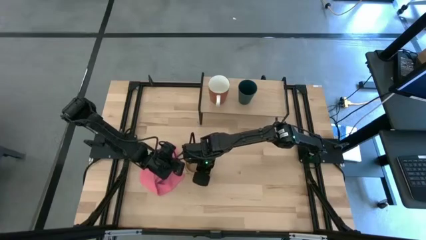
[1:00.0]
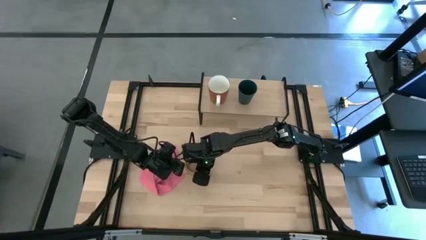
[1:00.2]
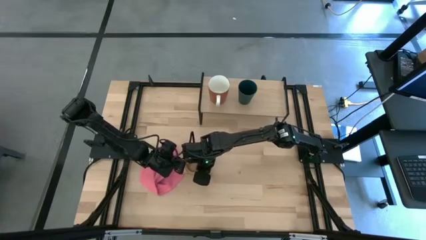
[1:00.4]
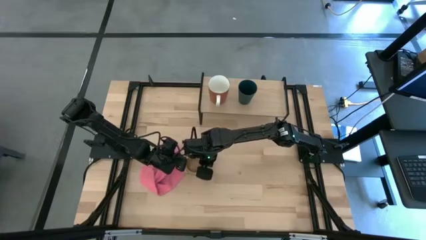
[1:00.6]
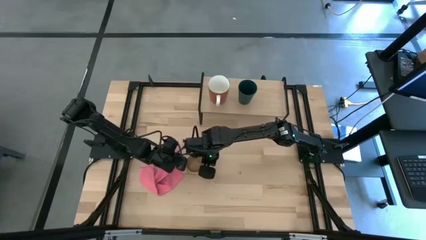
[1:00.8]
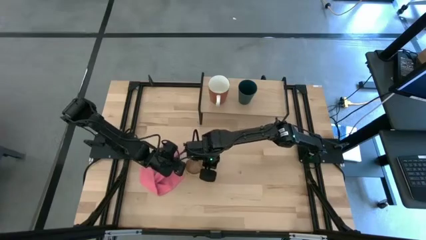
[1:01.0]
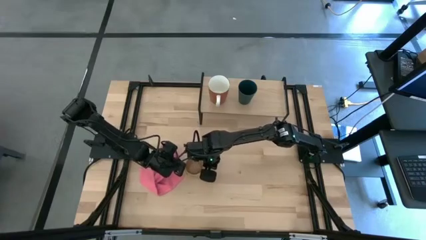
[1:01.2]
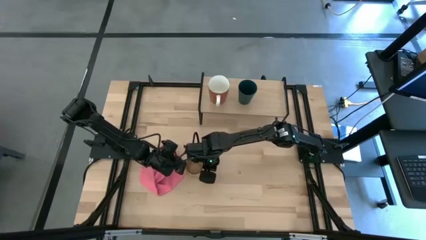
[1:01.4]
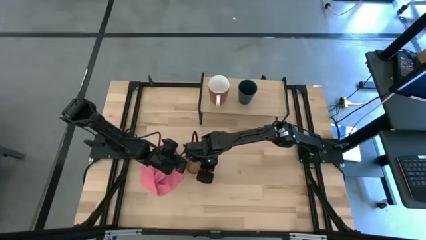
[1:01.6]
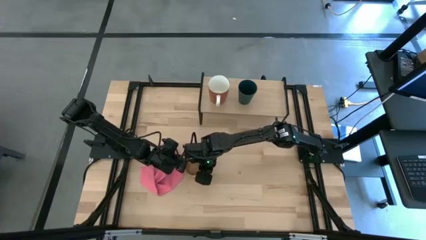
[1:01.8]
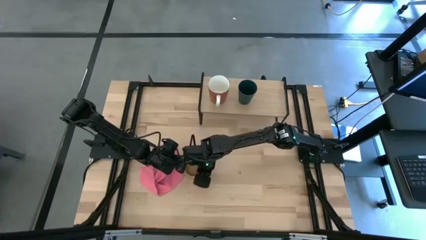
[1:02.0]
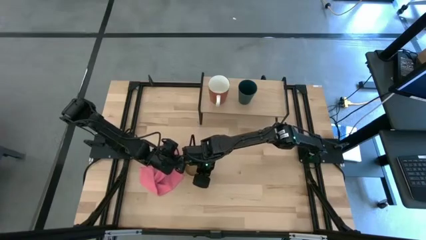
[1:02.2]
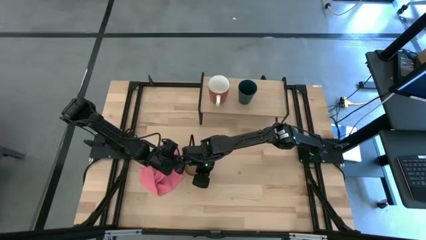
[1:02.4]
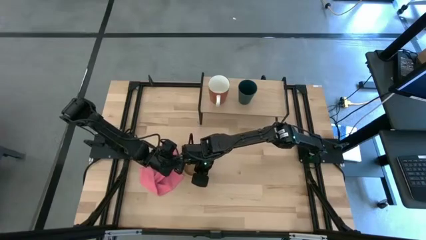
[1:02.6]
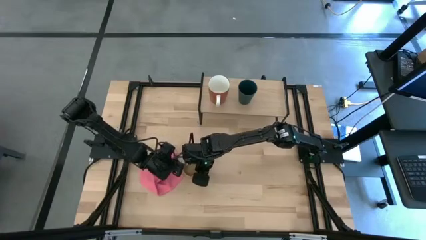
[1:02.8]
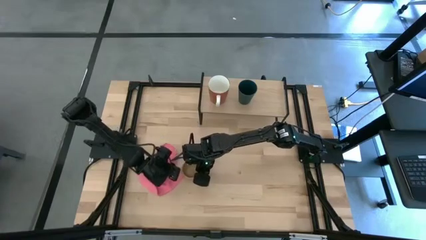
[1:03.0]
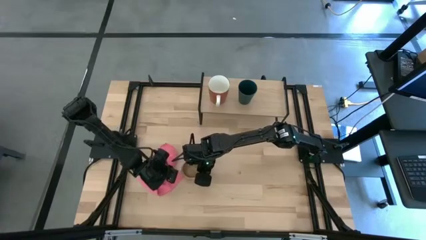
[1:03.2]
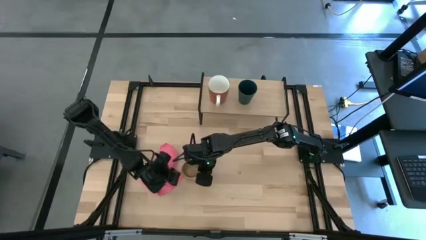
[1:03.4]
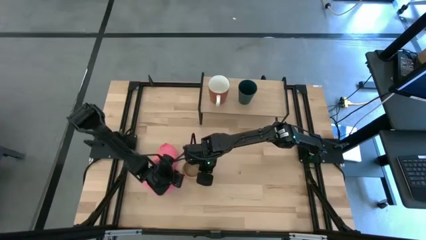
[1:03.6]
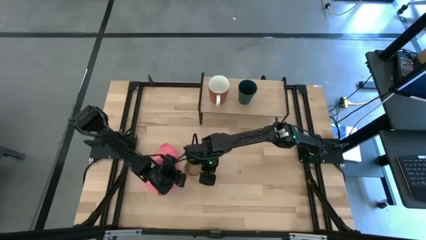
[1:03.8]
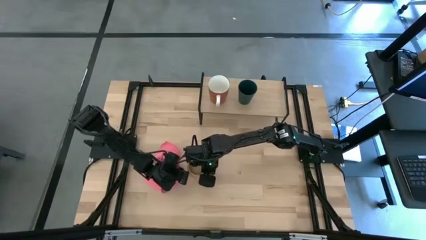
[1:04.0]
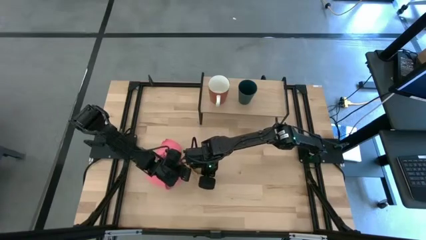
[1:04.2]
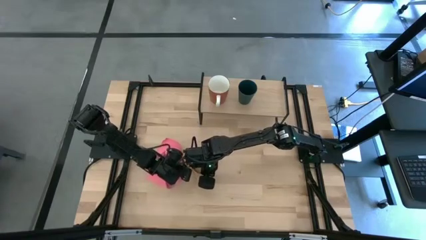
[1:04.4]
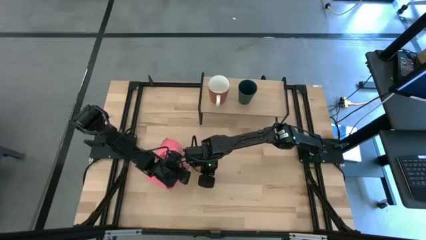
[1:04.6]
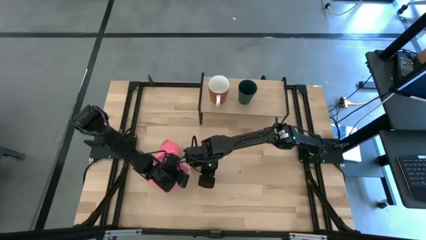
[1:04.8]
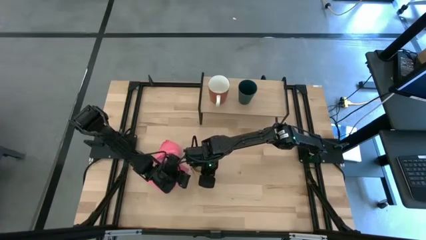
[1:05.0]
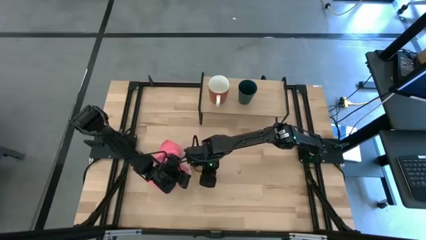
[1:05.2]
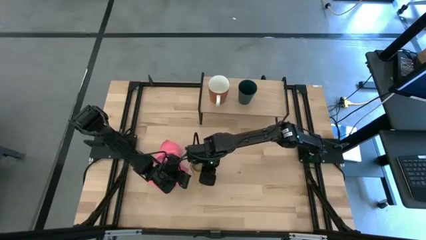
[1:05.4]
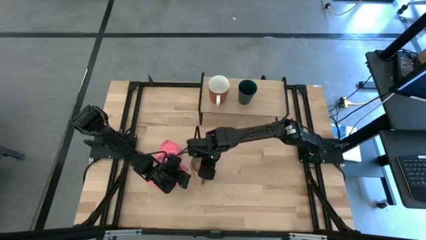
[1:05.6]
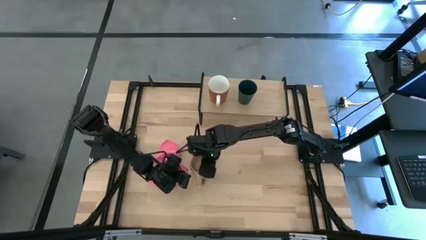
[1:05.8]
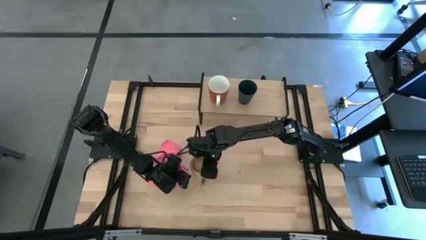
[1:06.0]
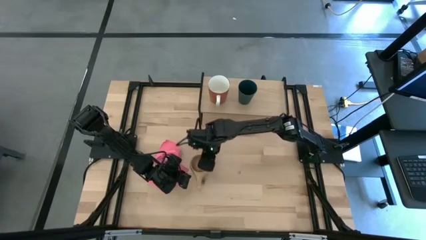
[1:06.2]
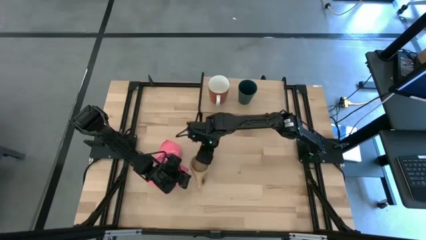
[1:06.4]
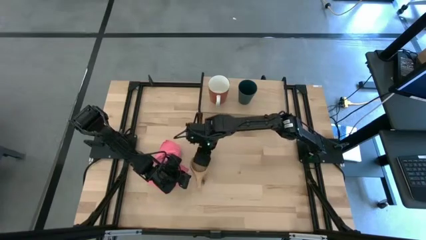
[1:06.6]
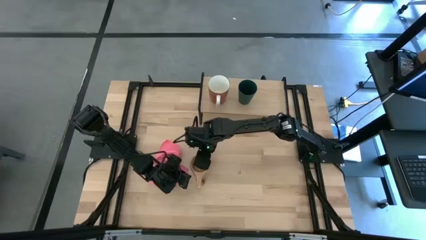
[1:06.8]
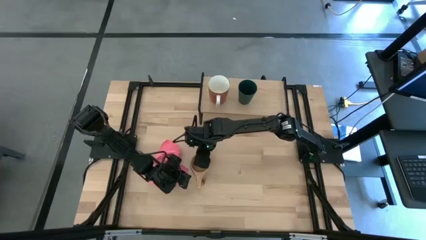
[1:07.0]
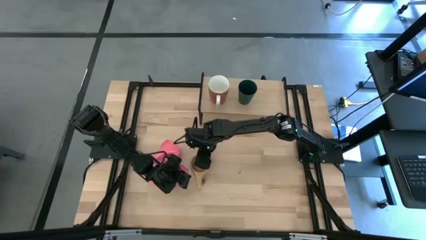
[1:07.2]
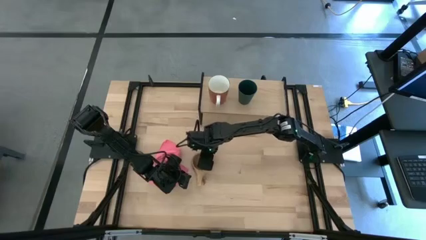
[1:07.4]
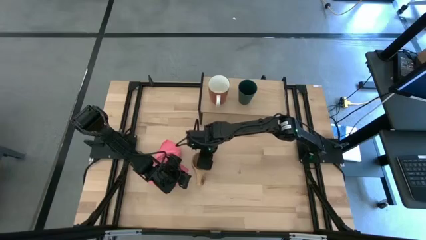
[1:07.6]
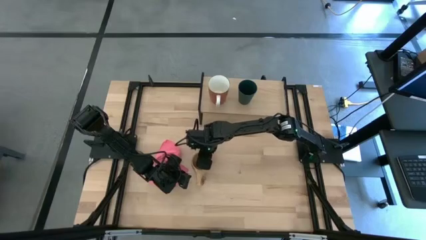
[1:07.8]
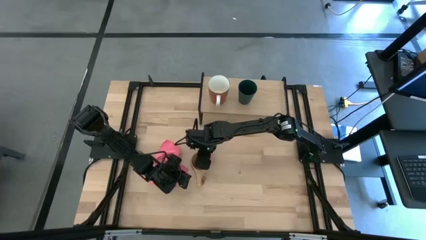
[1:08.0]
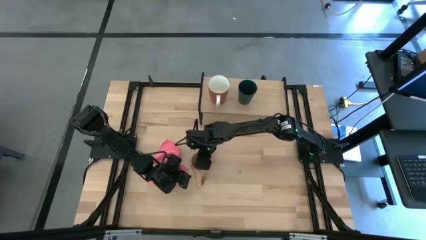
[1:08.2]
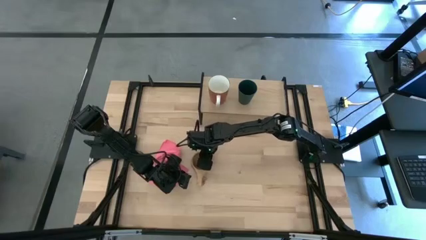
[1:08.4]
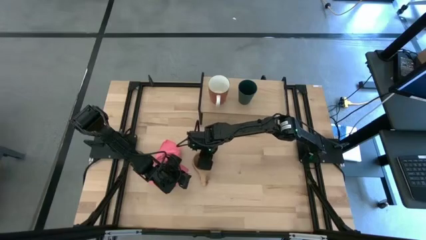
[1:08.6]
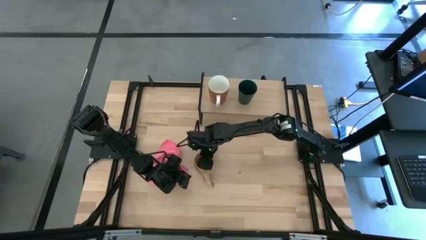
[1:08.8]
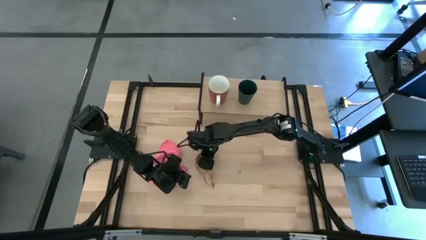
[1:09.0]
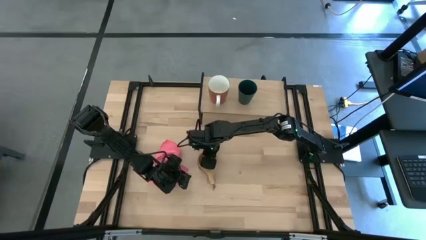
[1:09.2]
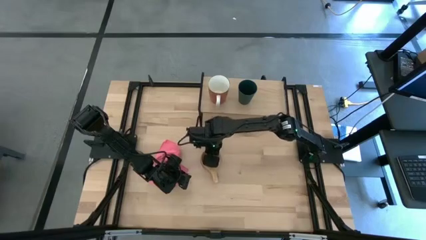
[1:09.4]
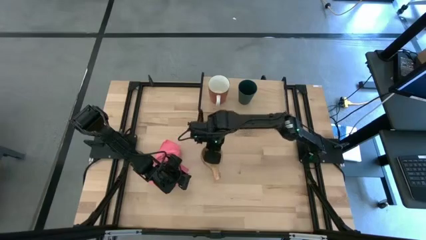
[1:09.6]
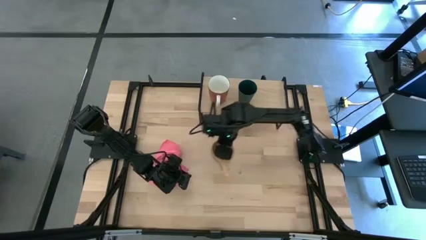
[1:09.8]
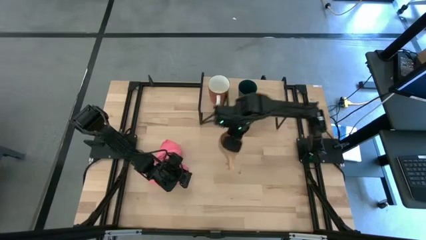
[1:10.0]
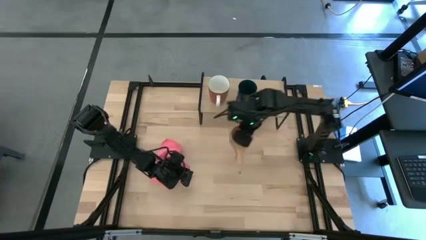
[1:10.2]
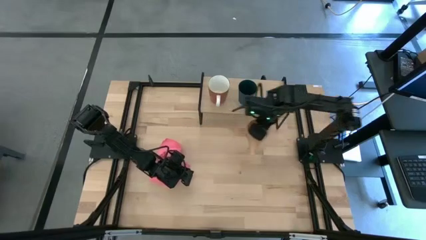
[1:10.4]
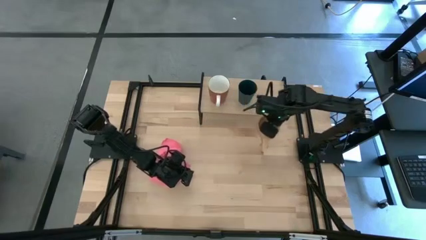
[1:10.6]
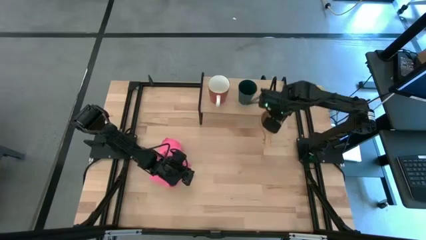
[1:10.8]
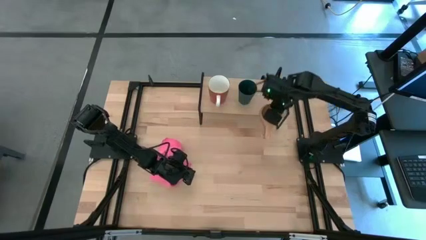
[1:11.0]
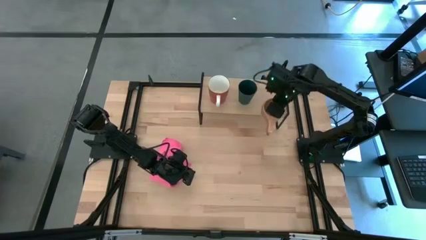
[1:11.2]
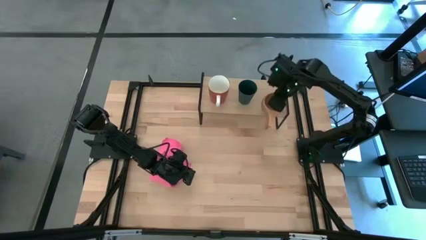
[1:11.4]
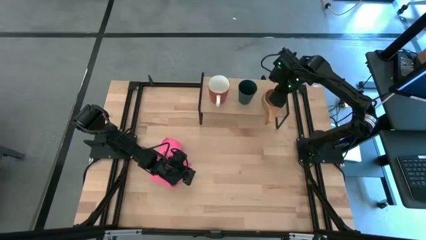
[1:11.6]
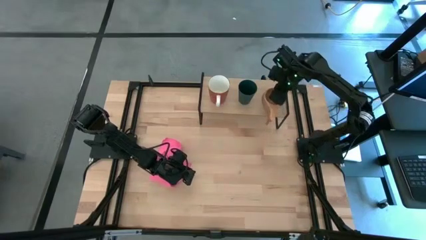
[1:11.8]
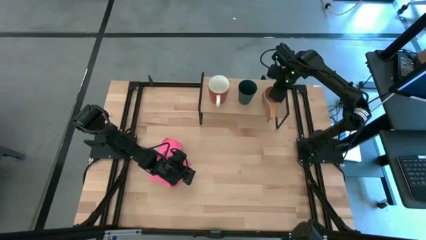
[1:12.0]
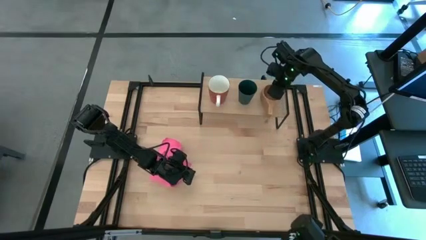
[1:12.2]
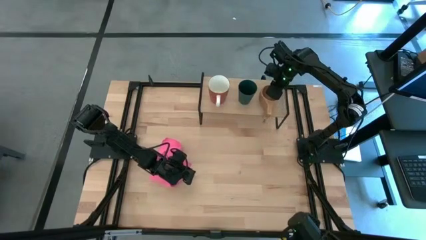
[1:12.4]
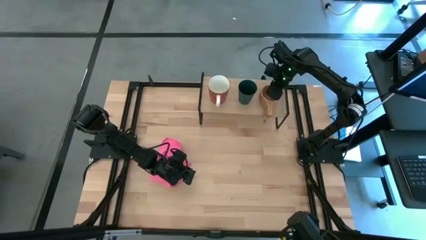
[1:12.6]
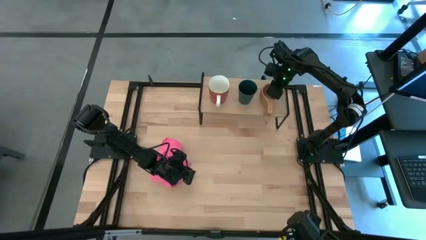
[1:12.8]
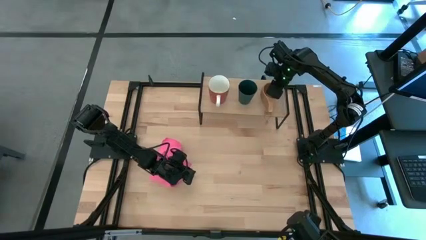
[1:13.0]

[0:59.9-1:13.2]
Task: Stack small to large cups/mugs on shelf
Put the brown wooden mug on the shelf
